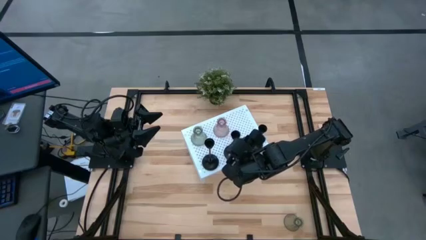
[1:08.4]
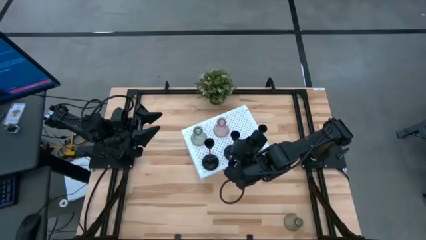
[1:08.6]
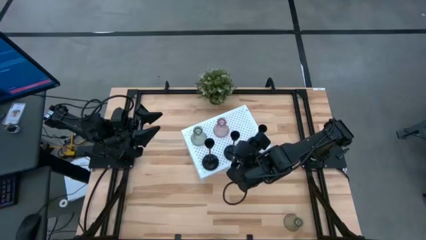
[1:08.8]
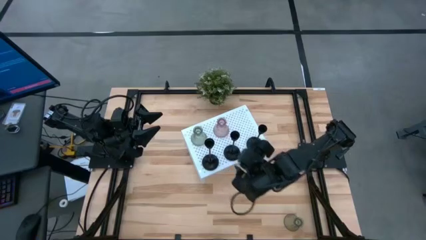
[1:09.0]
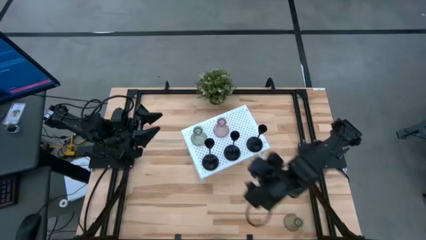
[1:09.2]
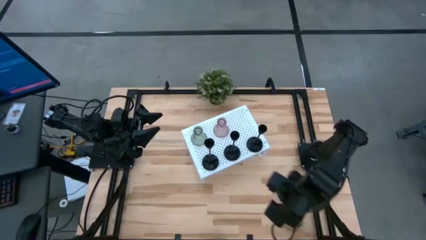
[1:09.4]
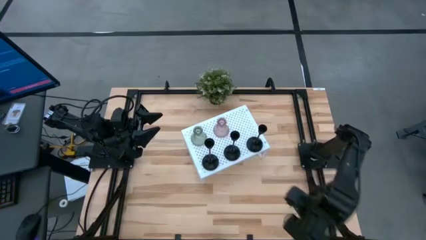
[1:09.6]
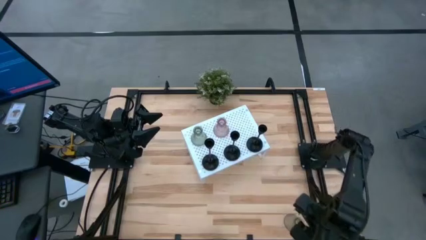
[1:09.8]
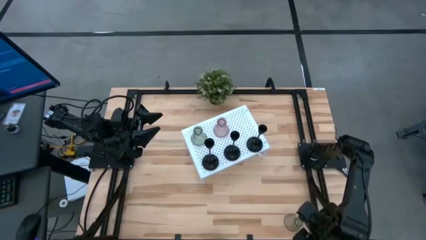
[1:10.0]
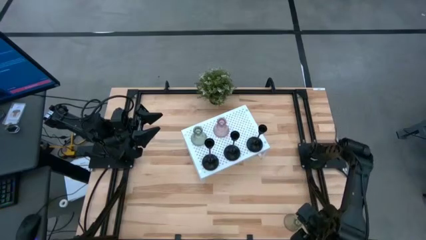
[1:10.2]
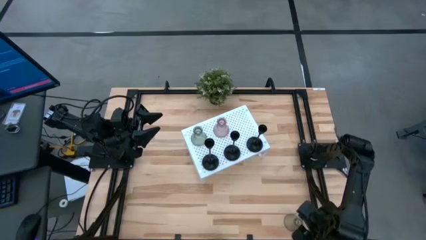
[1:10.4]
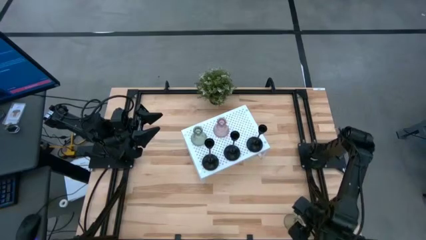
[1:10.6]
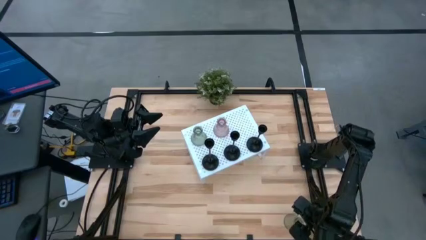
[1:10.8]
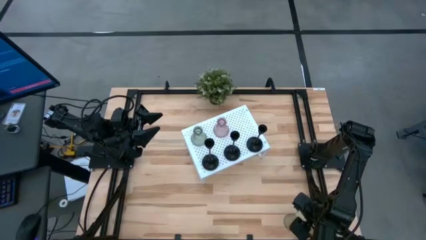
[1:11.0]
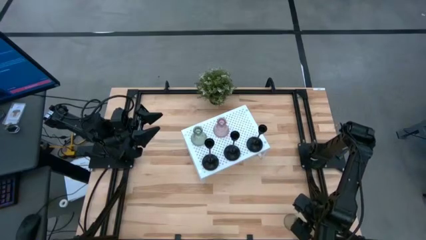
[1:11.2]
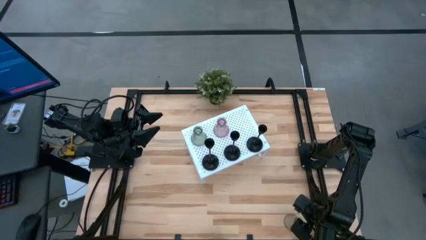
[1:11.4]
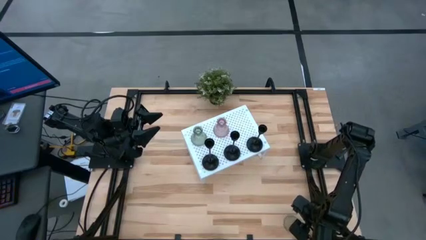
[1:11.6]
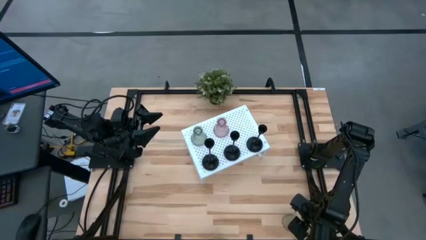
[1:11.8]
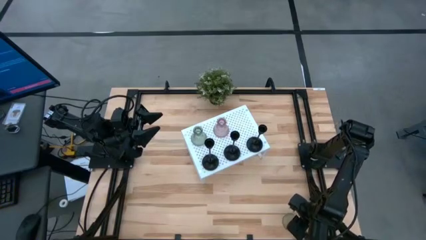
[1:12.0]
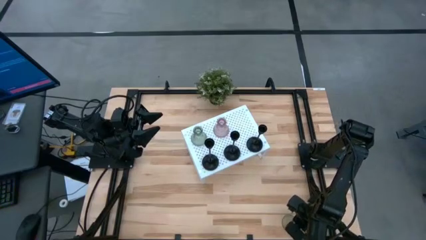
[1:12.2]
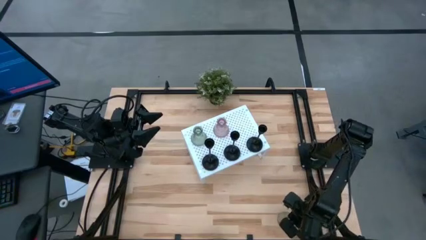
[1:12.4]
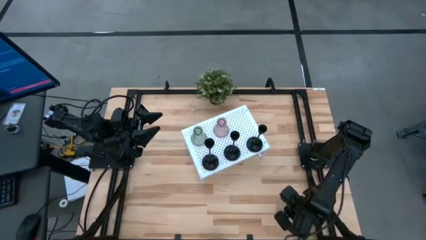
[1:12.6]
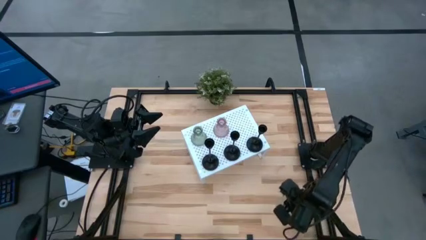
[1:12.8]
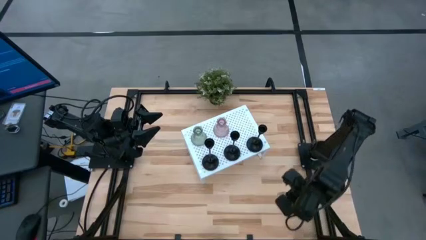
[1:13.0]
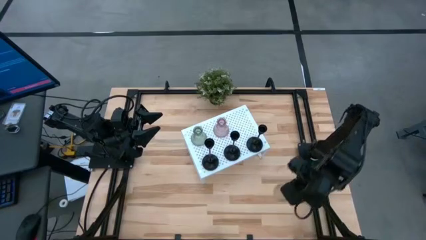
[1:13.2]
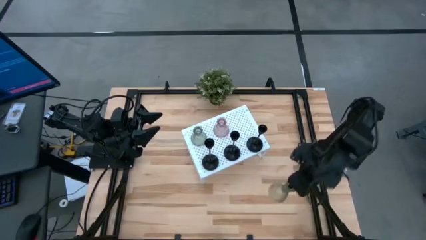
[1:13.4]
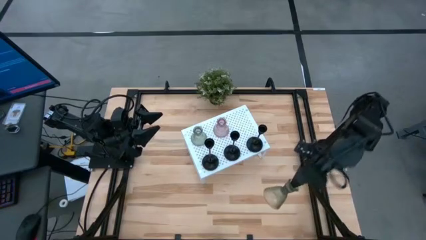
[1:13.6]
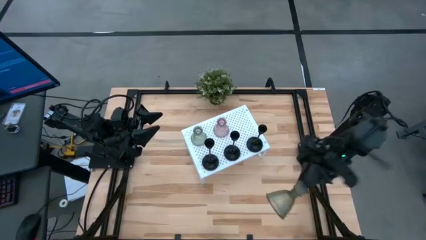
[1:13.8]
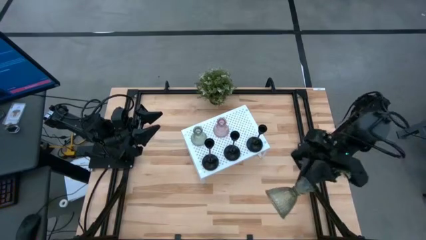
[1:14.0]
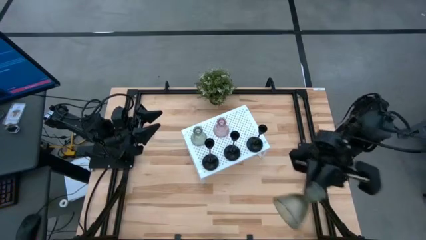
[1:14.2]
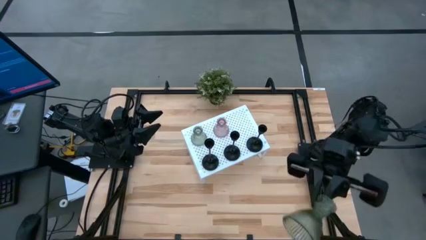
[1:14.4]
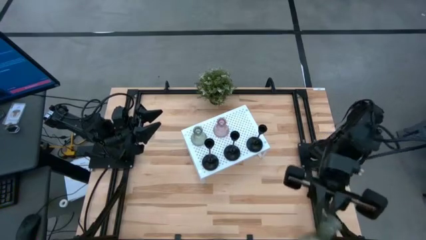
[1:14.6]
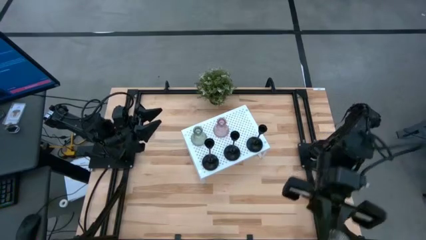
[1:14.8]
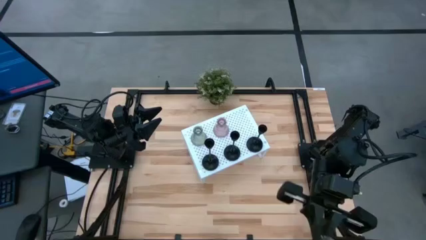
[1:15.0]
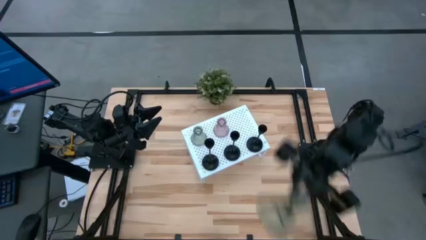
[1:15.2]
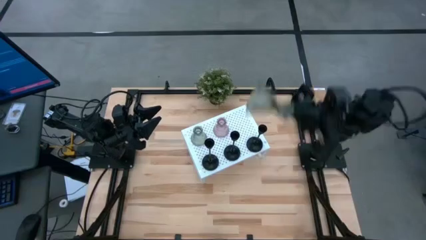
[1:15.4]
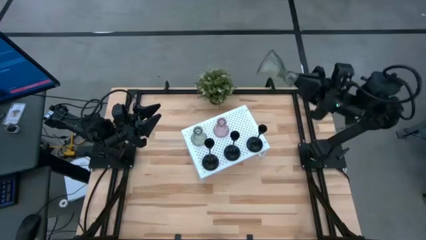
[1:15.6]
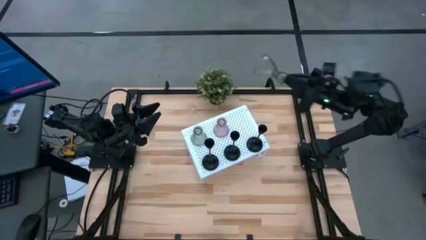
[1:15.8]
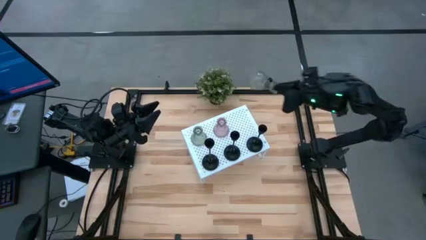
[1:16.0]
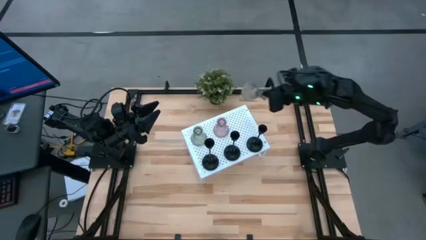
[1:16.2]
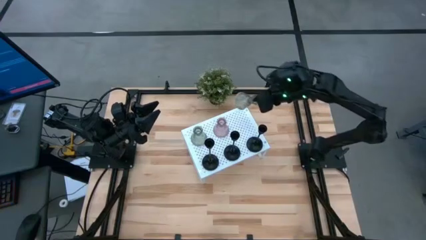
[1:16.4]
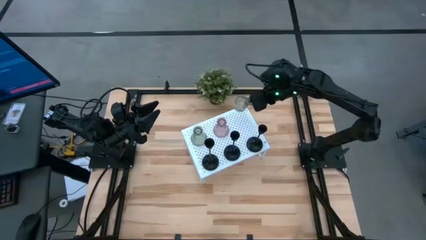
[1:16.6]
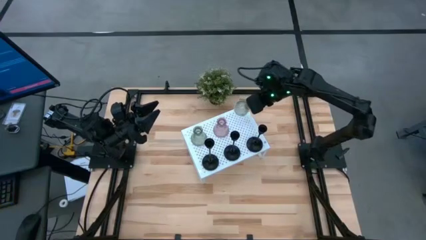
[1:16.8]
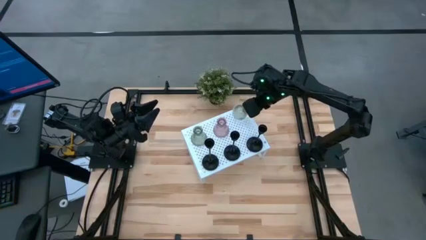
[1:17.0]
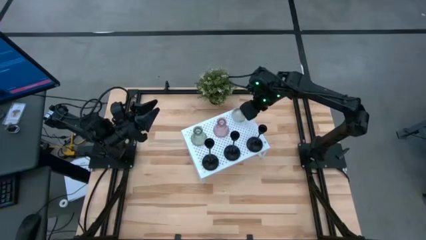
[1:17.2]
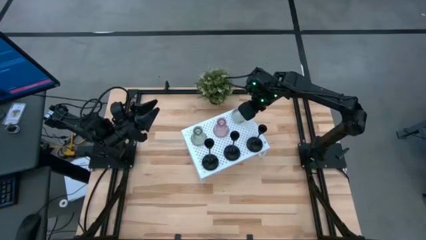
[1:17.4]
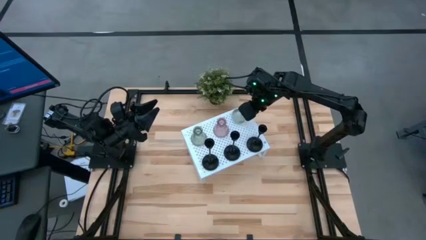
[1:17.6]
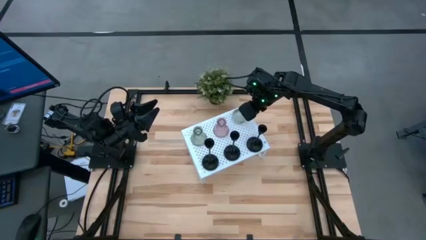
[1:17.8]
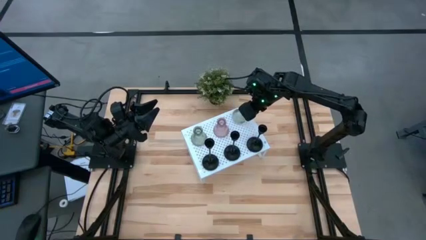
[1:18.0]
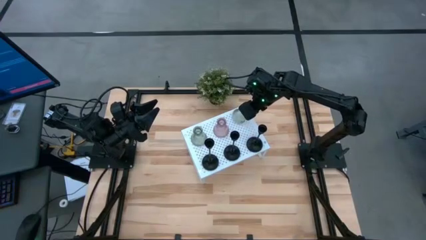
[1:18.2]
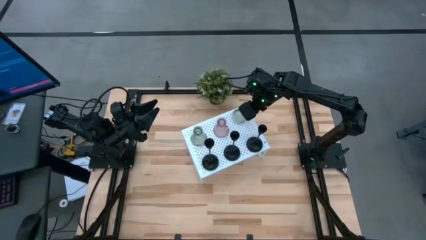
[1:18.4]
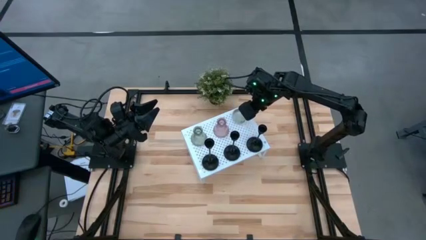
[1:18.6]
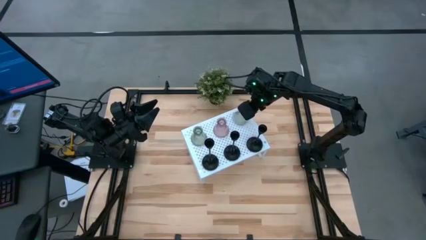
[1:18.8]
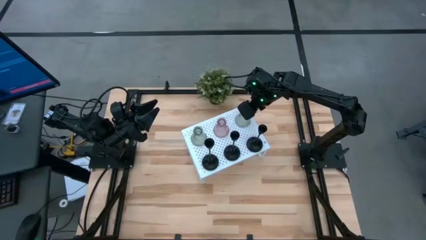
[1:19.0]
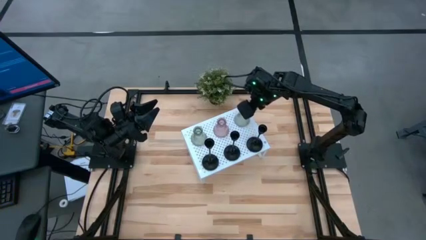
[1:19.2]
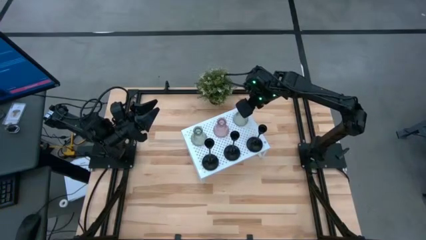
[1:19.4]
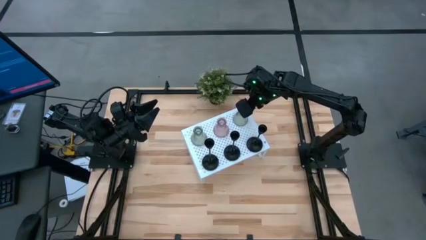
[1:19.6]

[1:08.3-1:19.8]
Task: Pick & Place candle stick holders
Put the green transparent candle holder on the shelf

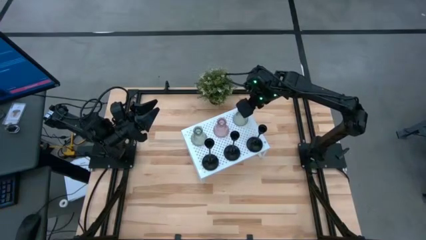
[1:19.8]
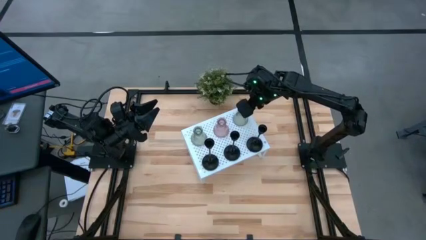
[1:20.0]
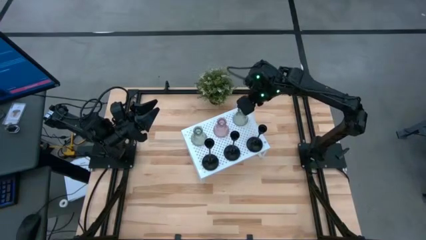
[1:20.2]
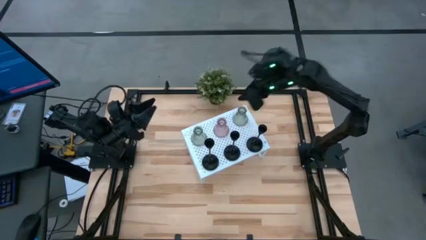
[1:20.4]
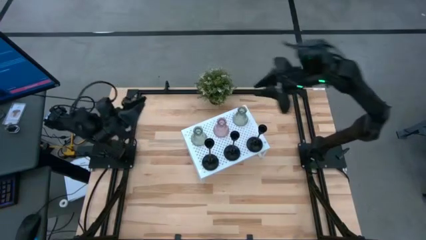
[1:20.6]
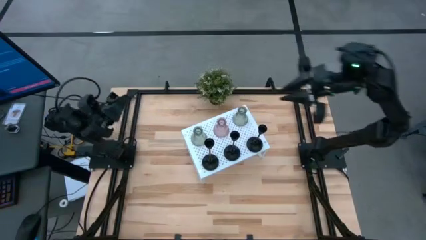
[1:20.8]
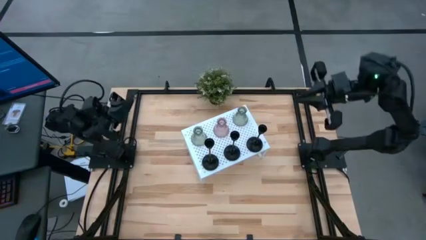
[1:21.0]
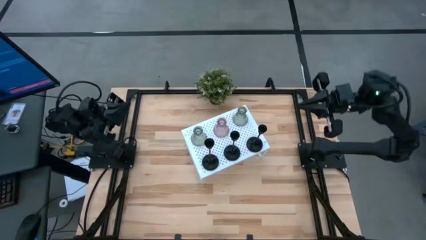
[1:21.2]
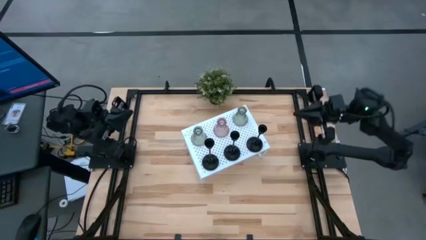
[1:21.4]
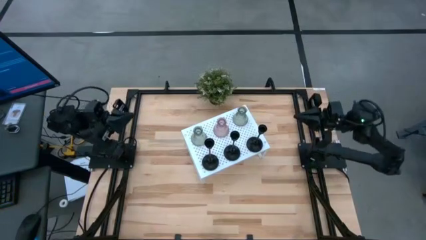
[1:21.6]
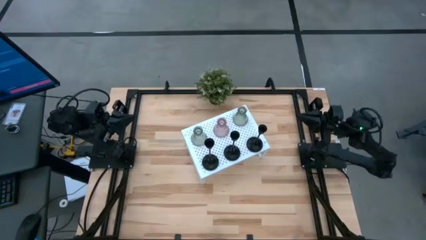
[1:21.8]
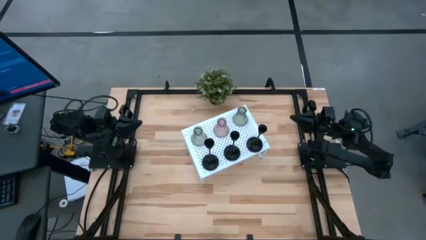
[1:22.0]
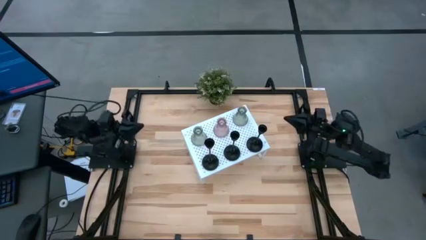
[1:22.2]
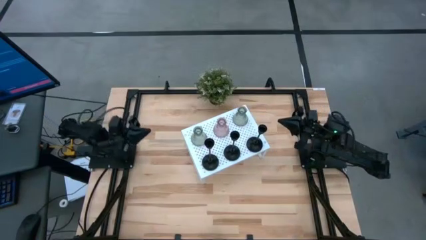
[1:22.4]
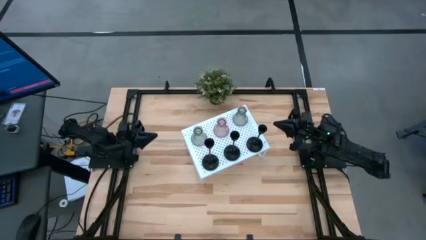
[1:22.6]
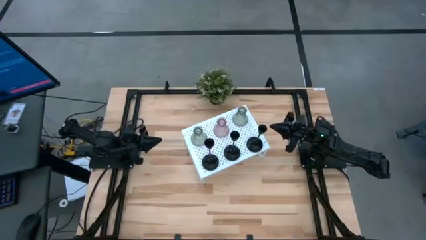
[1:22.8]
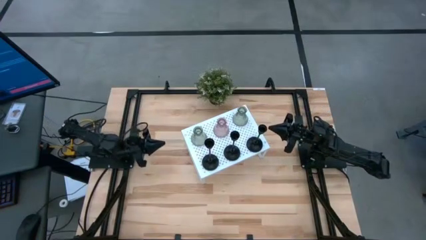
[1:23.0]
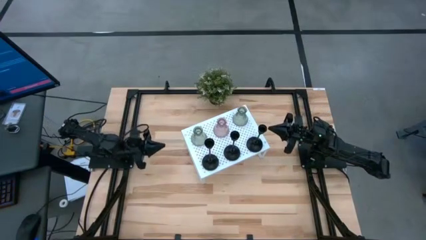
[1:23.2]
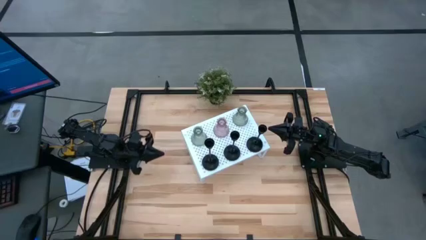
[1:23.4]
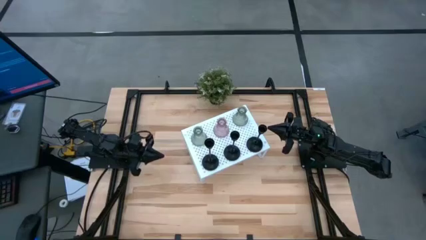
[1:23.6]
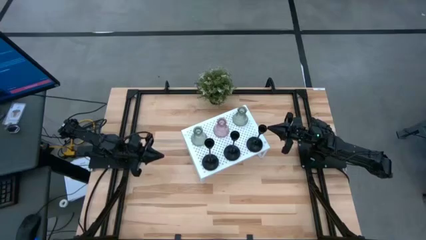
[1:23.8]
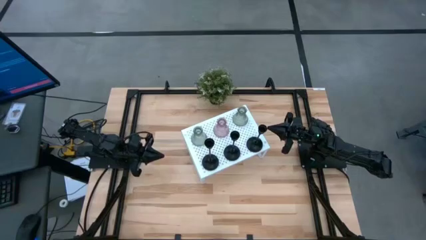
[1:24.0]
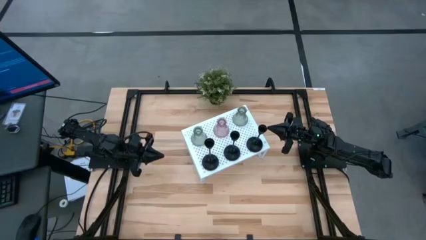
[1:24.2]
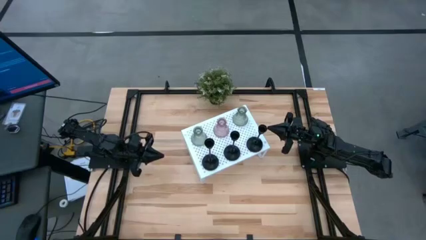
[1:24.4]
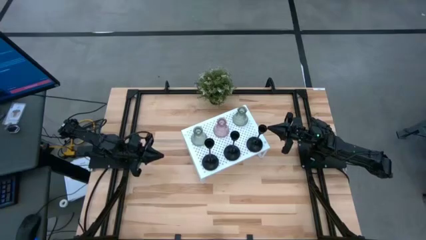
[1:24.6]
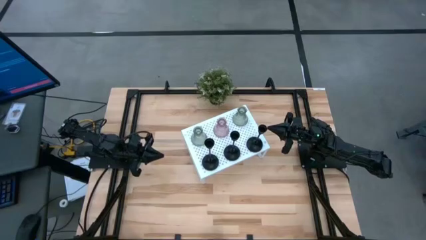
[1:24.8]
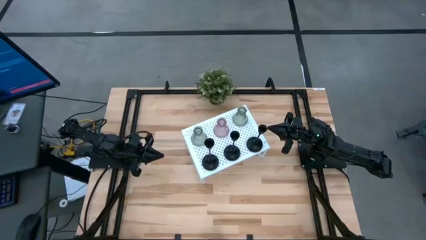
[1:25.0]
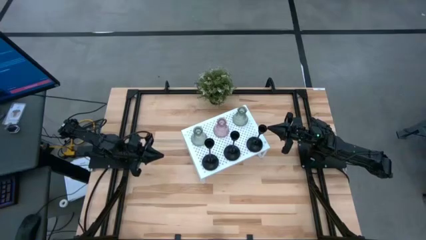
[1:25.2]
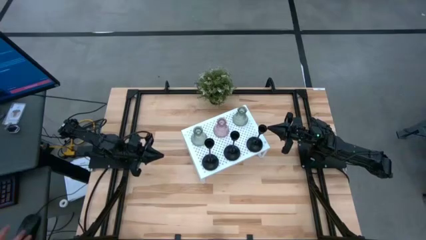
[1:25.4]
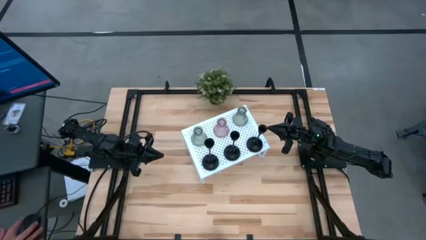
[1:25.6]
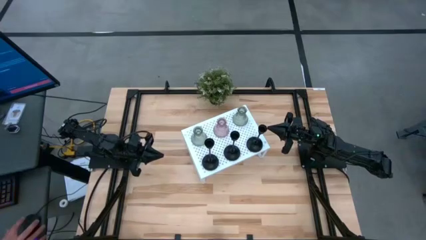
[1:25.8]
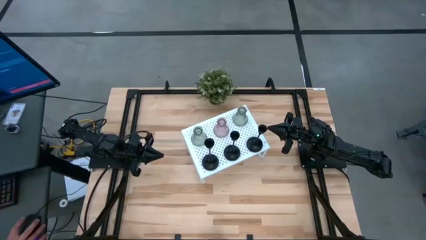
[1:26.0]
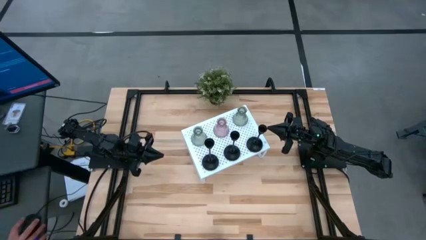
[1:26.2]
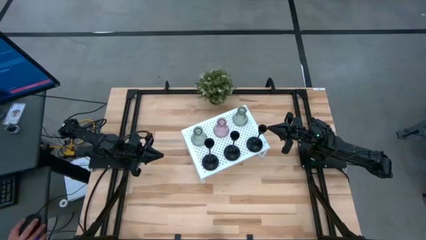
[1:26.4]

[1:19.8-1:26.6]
Return to Home Position
